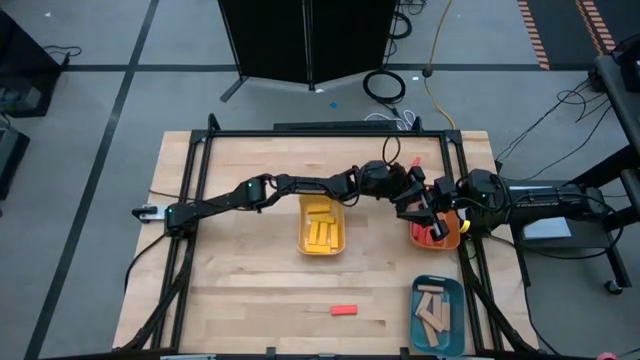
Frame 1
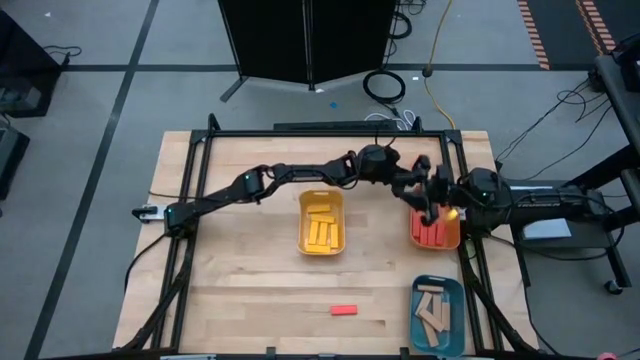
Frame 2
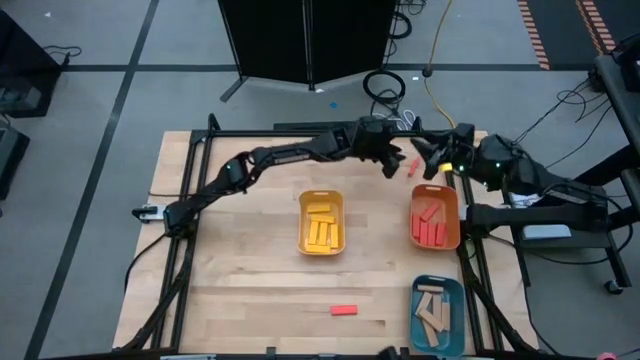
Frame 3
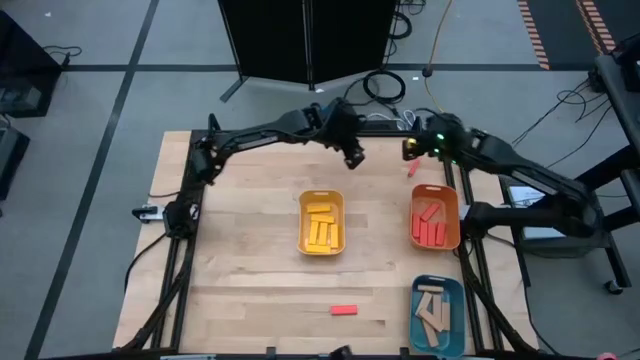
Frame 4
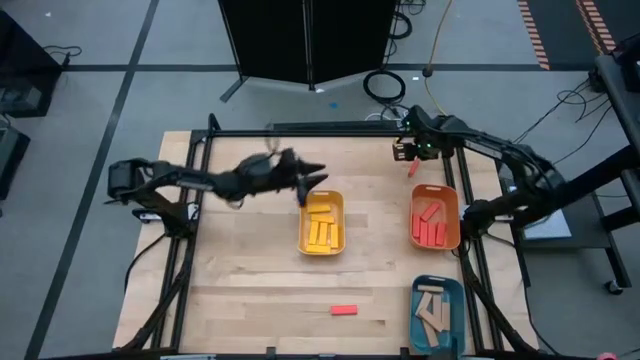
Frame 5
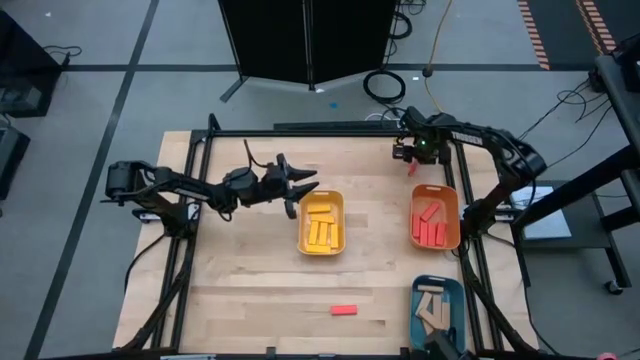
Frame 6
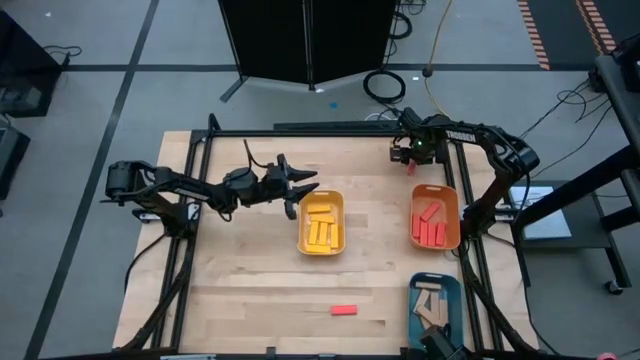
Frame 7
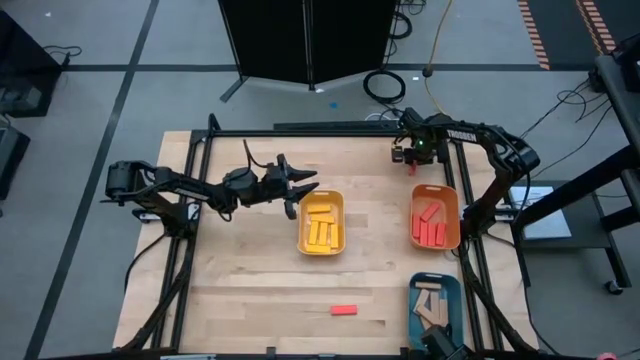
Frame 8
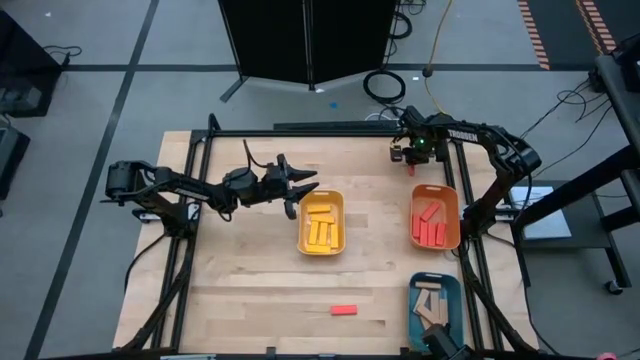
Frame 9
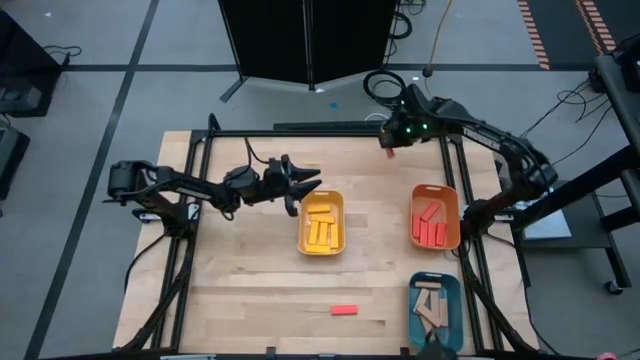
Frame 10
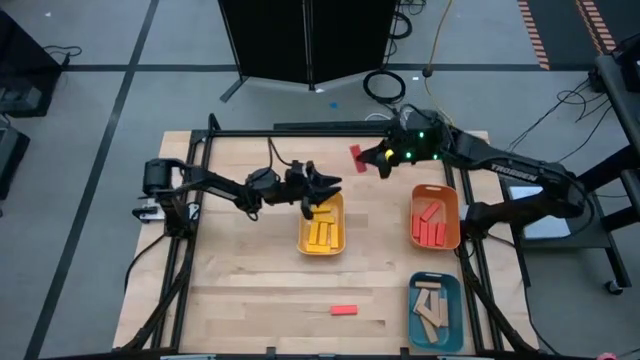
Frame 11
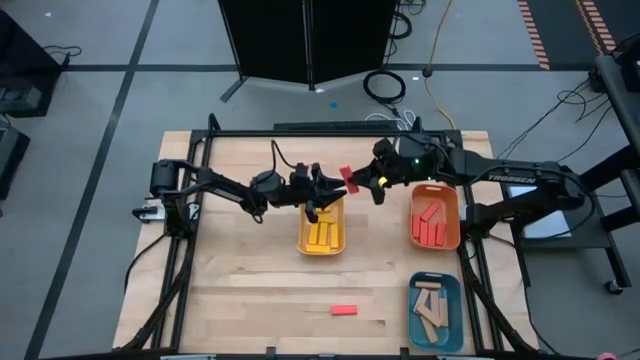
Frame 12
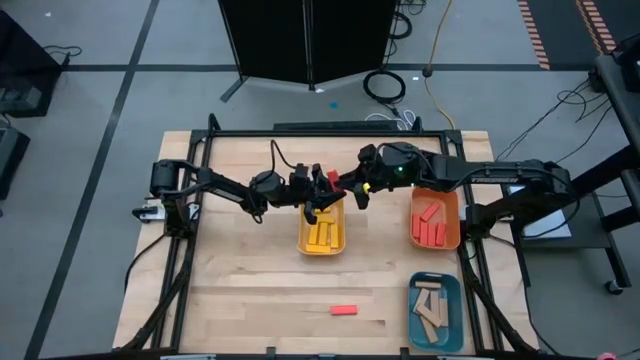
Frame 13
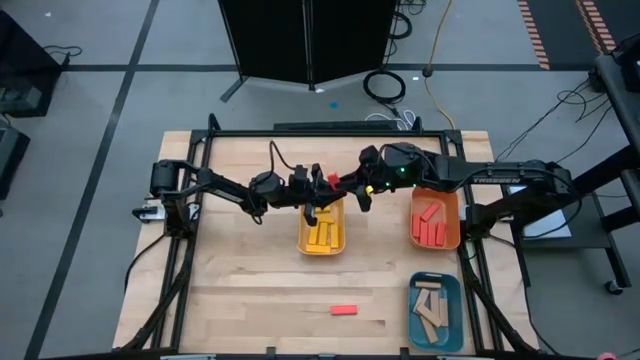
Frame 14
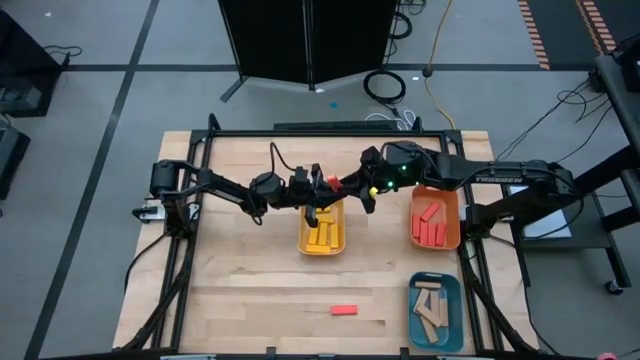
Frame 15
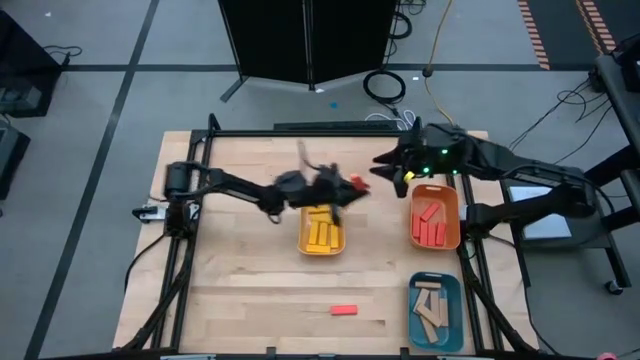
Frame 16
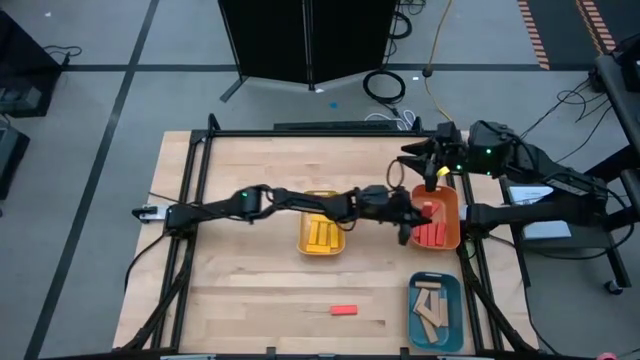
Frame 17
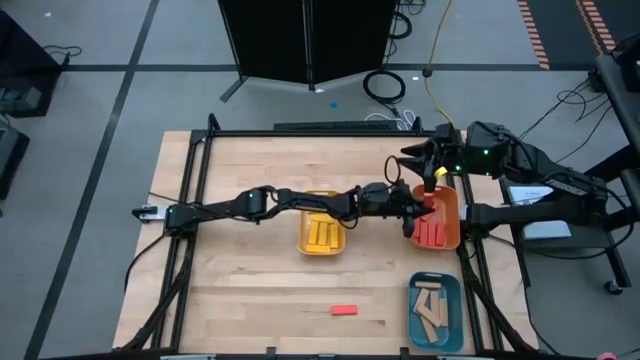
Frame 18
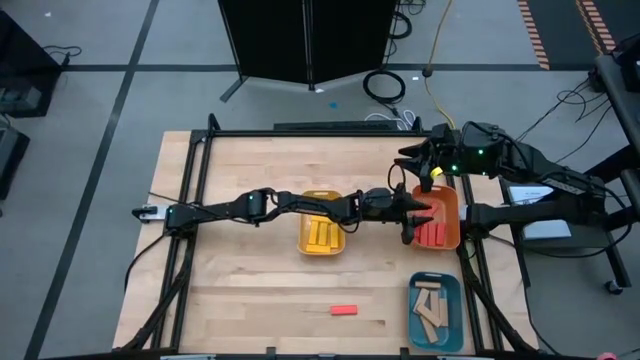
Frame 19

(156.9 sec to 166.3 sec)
Task: Sort blocks
Put the orange wooden block into the orange bin

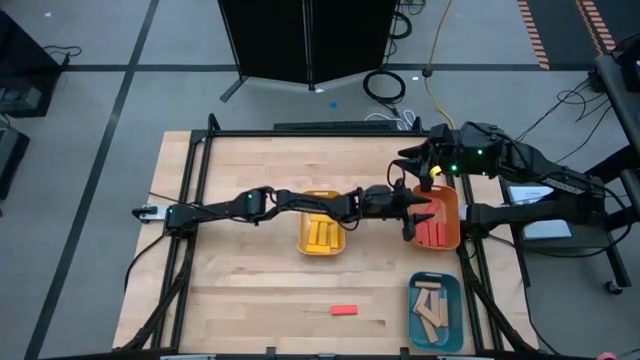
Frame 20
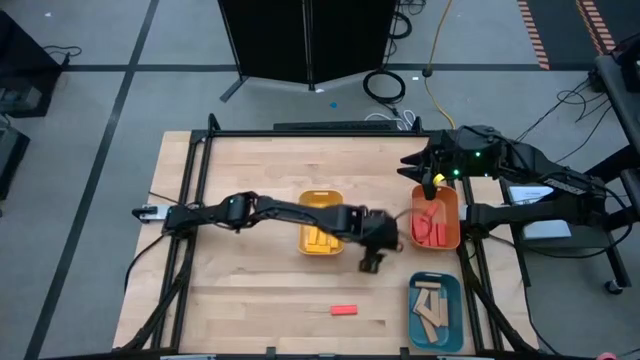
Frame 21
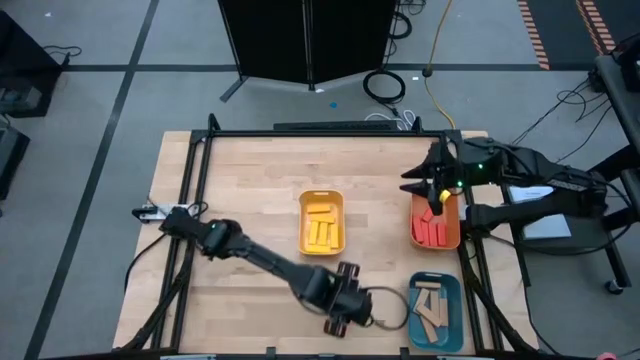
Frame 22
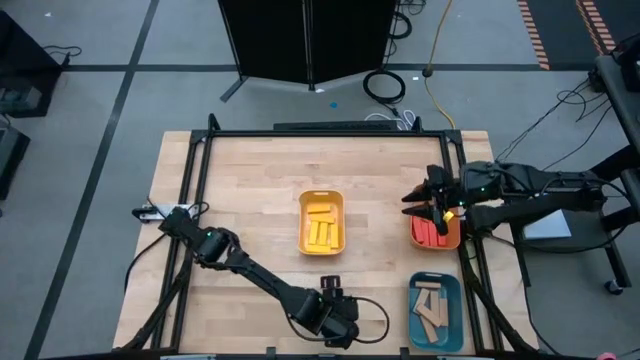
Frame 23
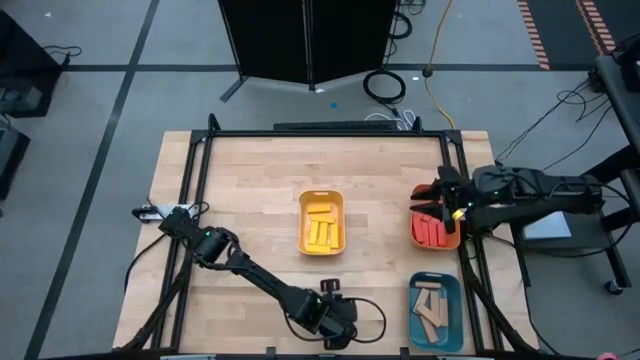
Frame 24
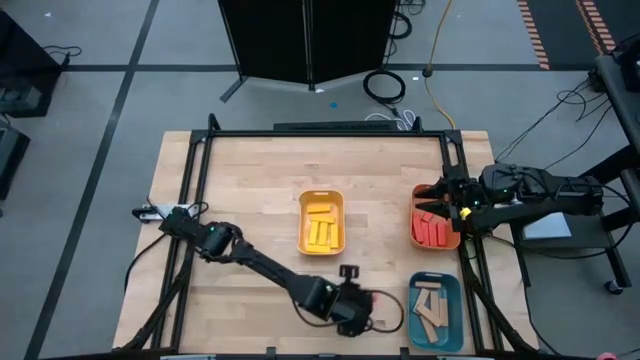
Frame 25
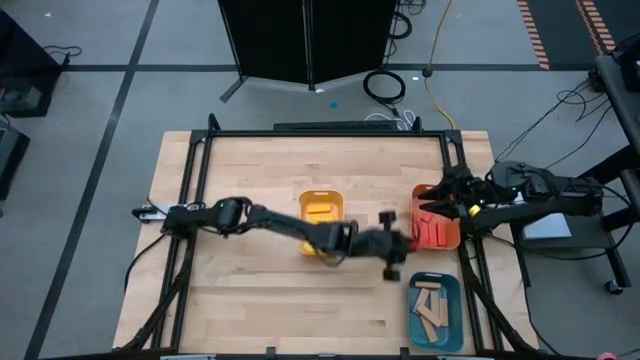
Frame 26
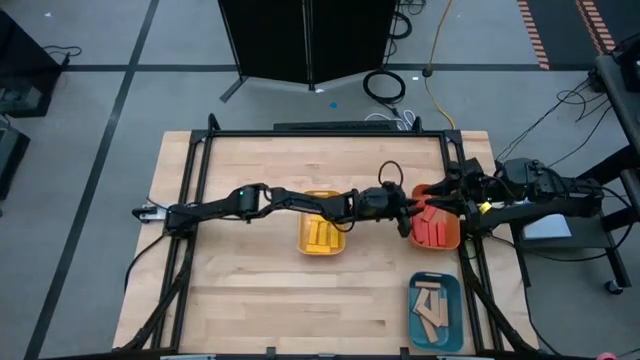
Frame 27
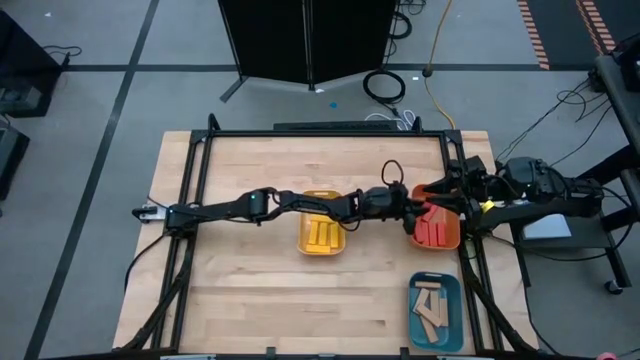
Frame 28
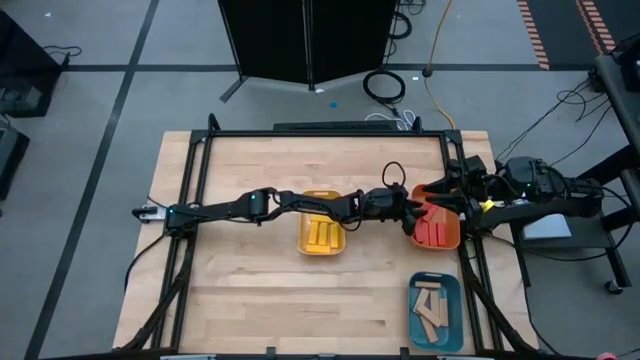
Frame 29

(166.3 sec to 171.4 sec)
Put the orange wooden block into the orange bin

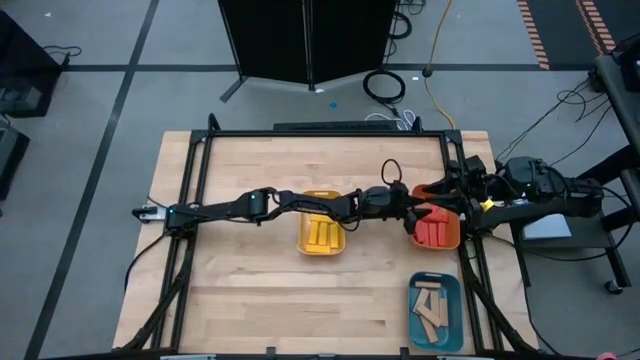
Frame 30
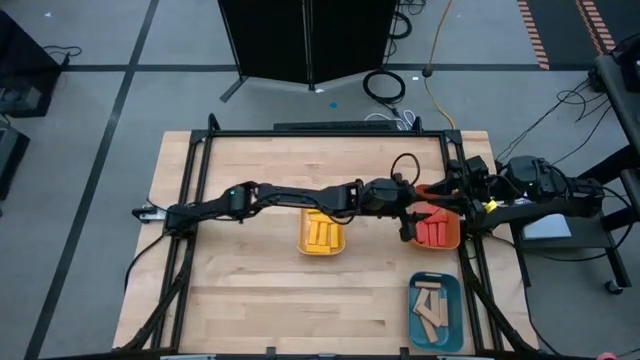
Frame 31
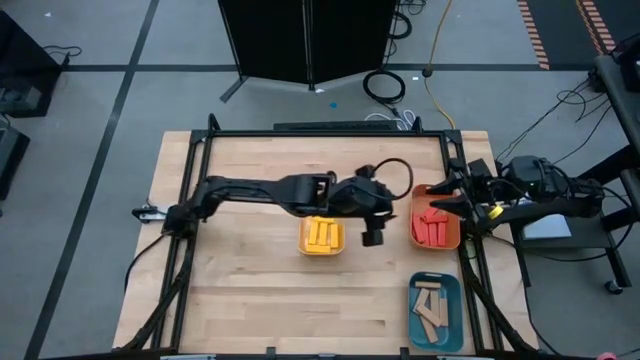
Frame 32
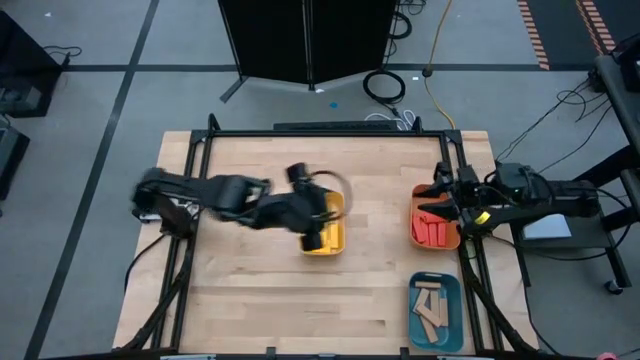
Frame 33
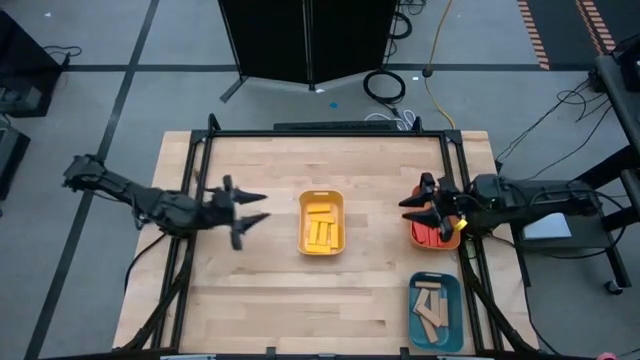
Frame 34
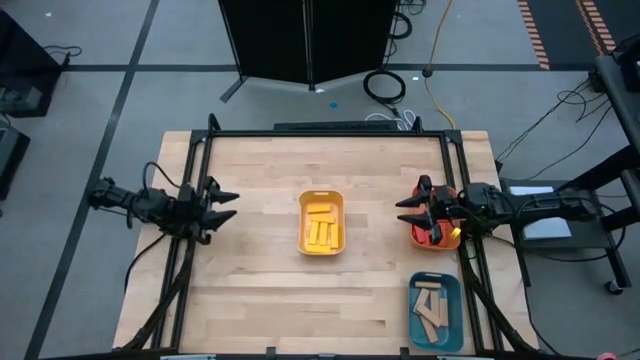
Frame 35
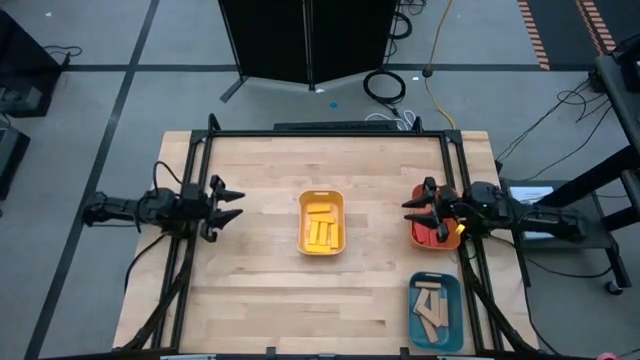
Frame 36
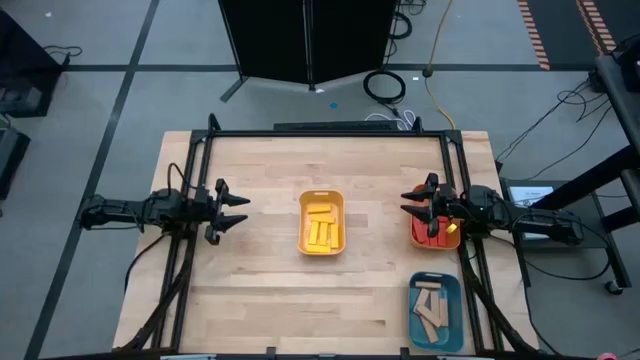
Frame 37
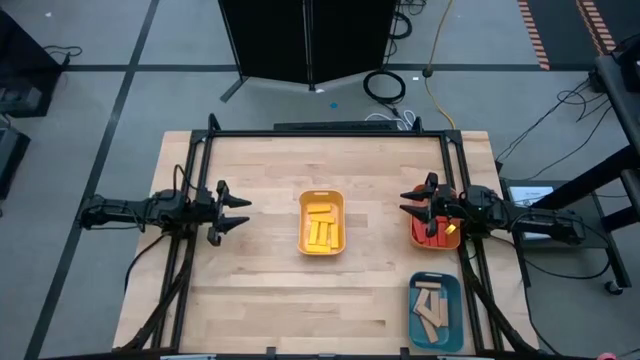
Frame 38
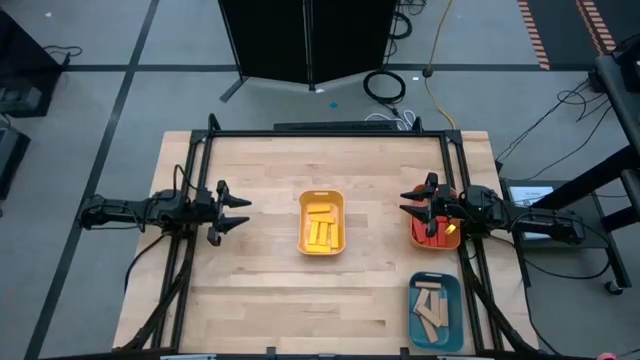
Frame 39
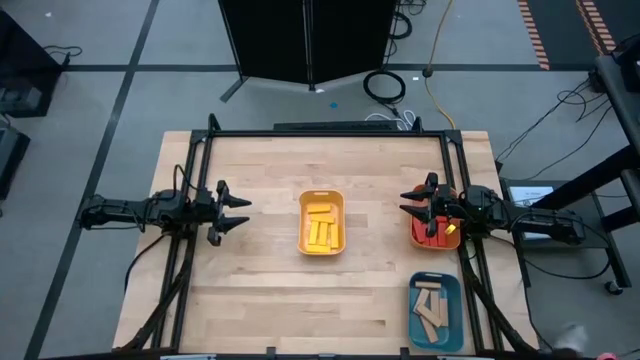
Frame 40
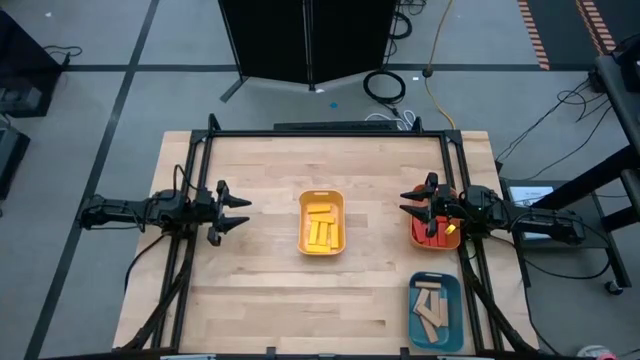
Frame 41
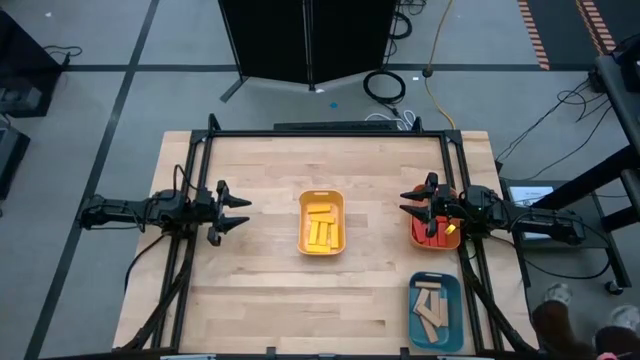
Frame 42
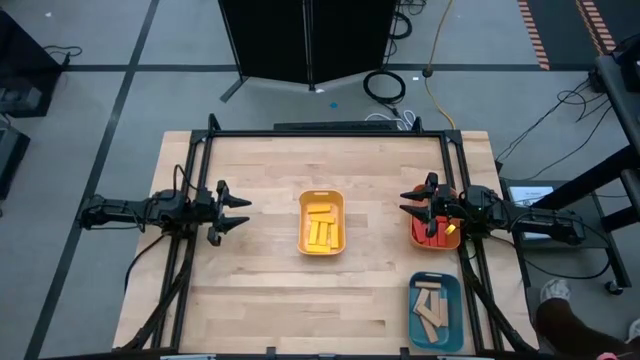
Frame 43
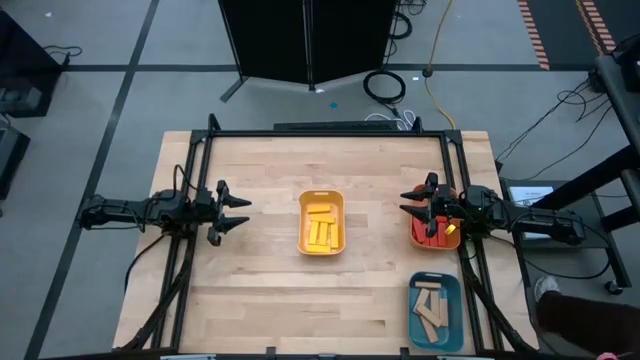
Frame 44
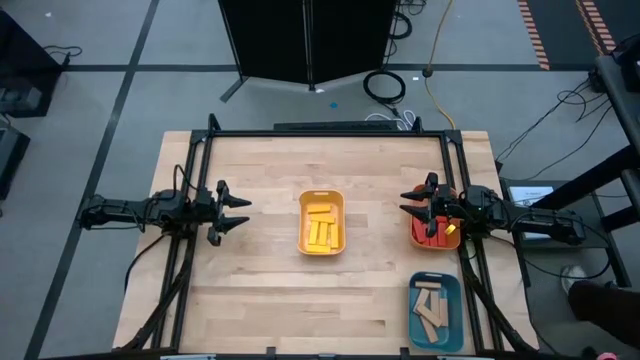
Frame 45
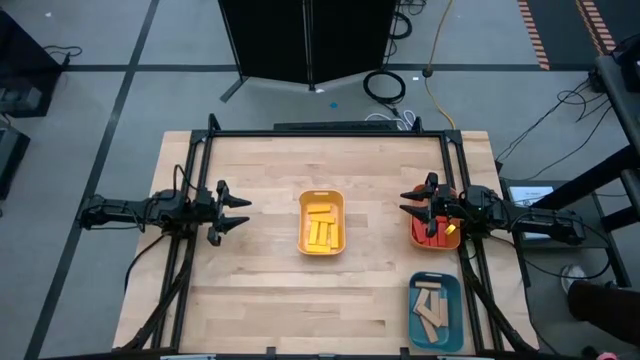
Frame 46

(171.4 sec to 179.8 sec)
Return to Home Position
